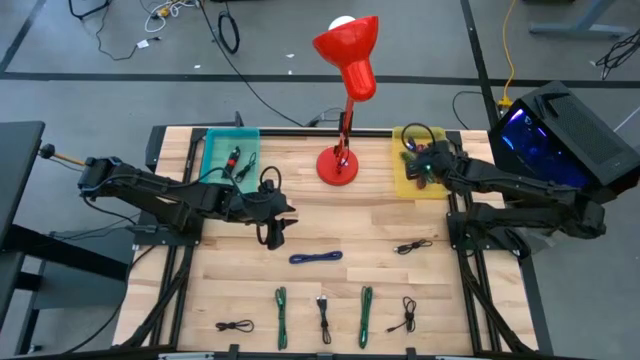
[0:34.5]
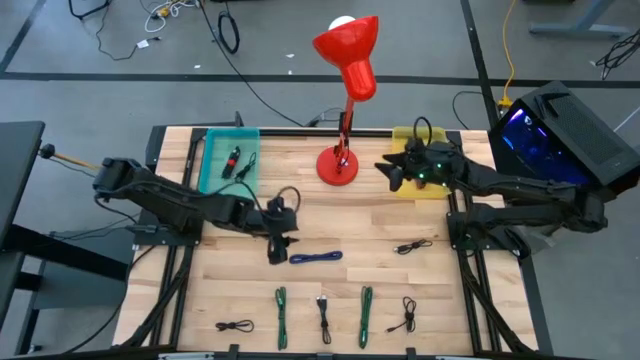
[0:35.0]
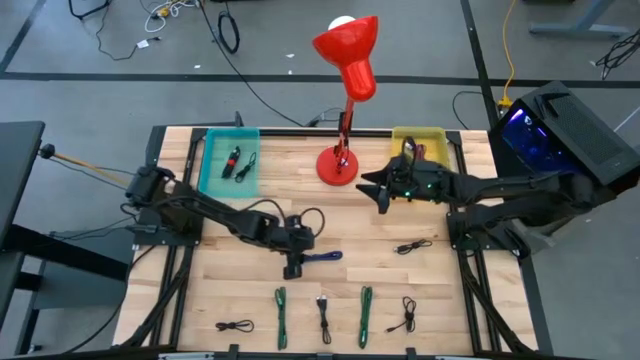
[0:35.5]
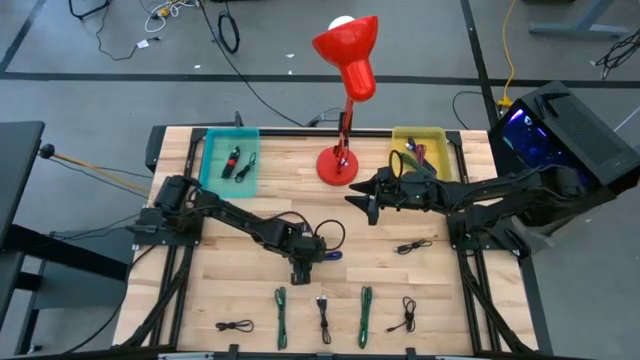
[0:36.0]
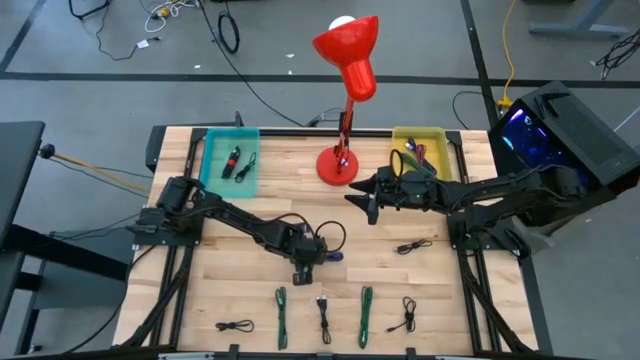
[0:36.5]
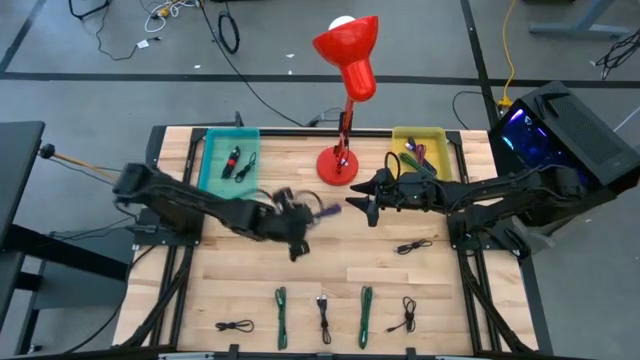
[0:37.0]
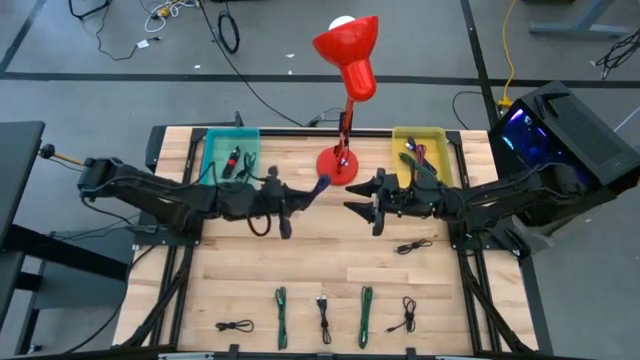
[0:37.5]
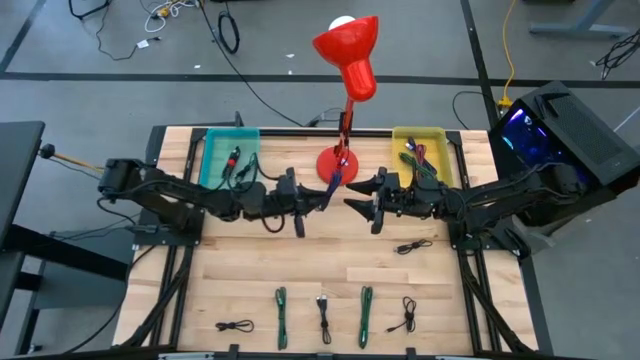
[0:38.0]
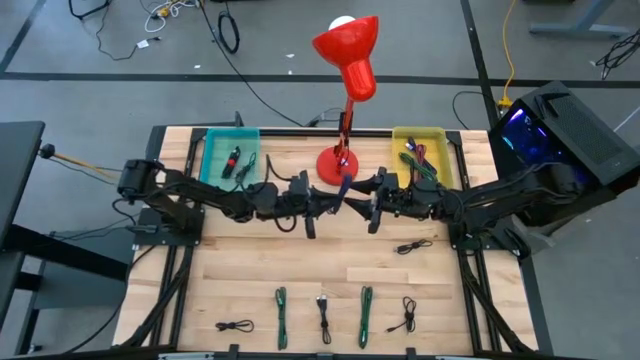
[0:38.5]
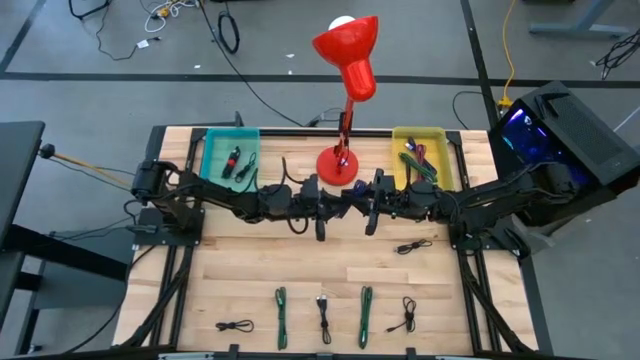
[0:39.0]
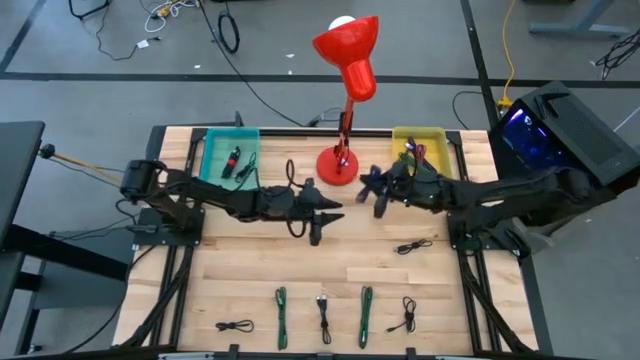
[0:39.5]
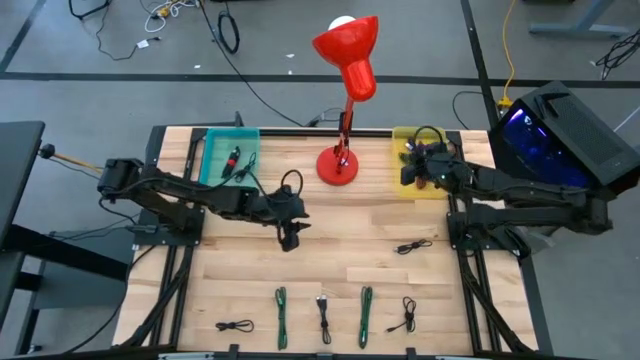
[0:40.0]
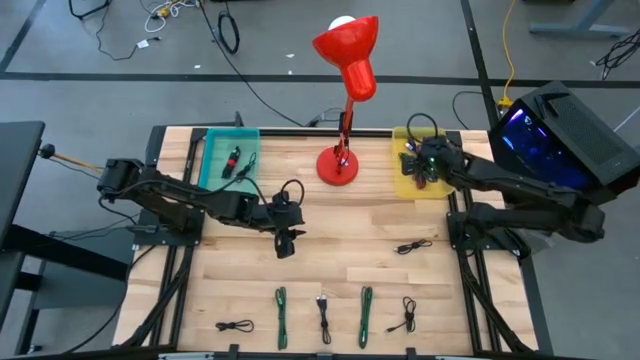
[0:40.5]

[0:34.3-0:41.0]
Task: Pick & Place USB Port
Put the violet black USB cable into the yellow bin

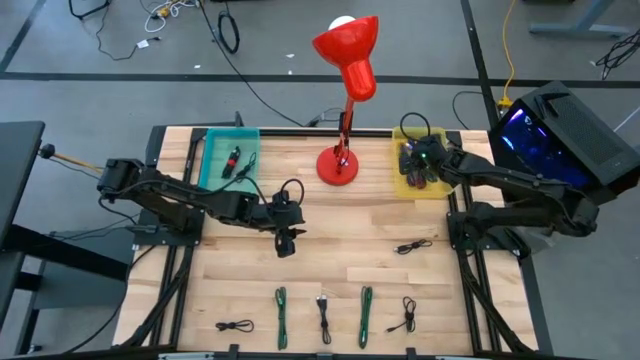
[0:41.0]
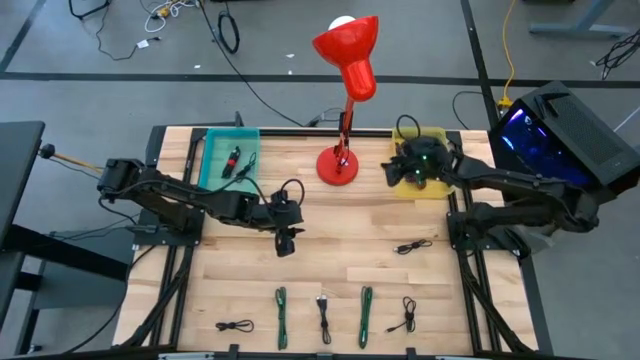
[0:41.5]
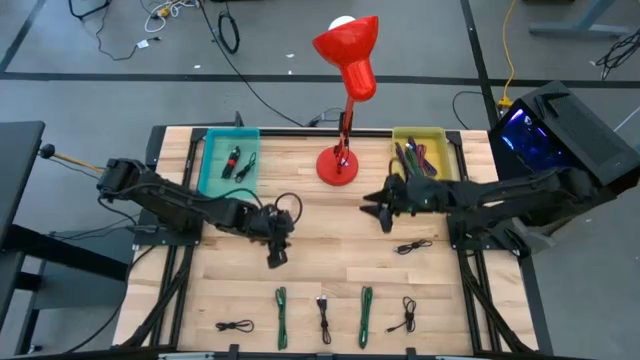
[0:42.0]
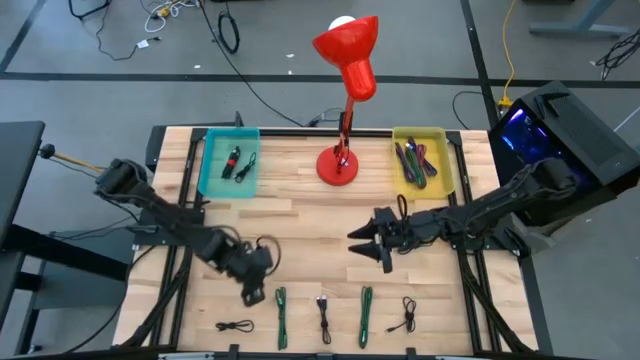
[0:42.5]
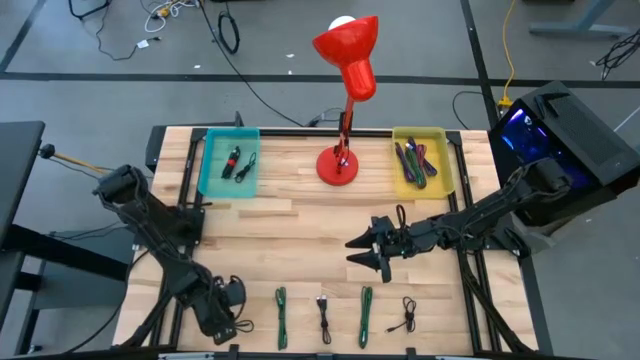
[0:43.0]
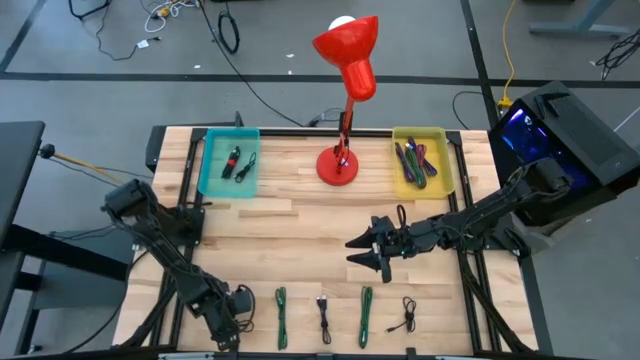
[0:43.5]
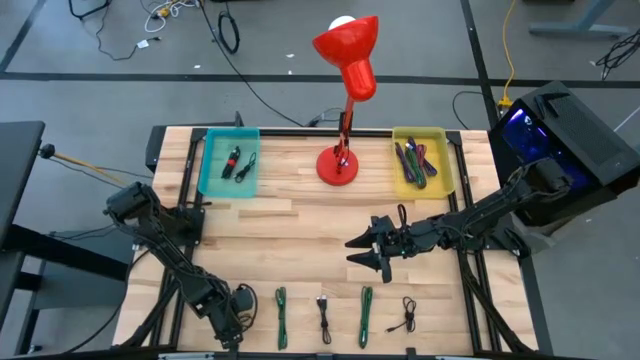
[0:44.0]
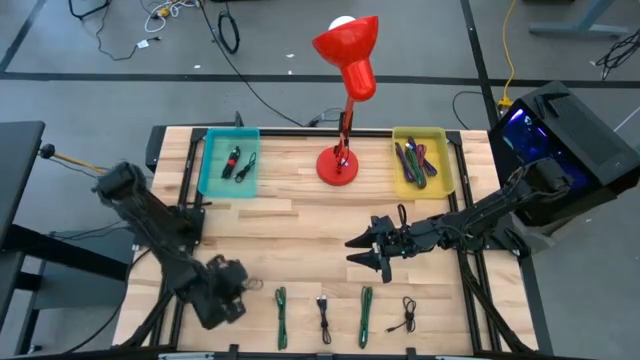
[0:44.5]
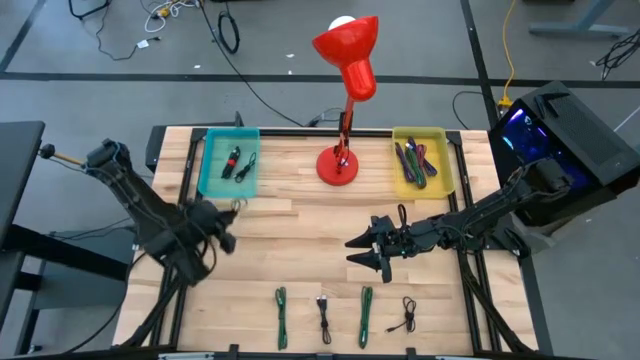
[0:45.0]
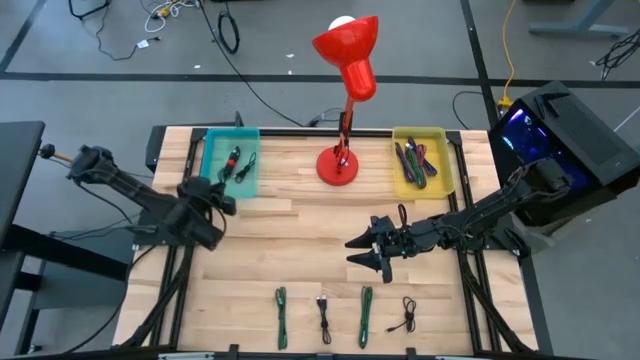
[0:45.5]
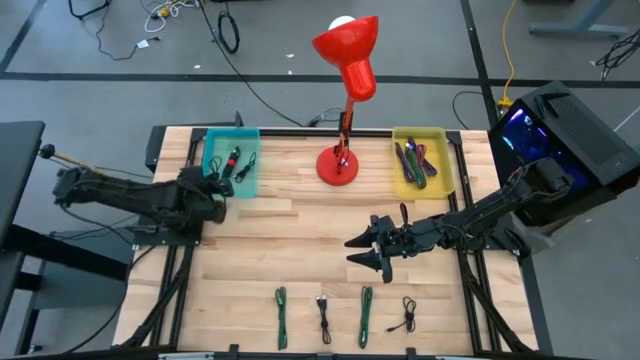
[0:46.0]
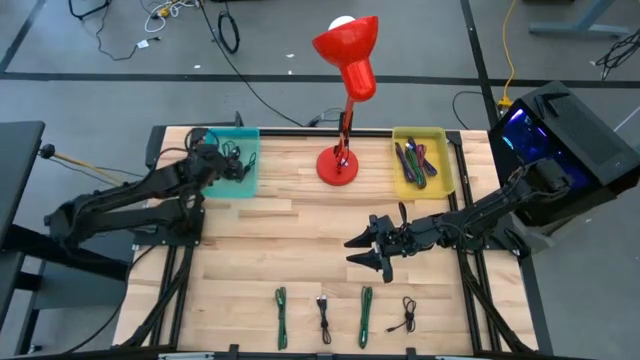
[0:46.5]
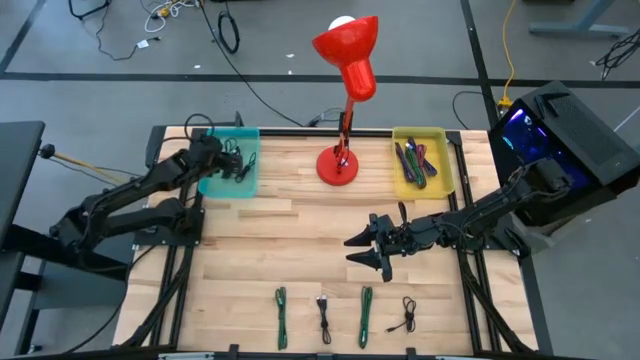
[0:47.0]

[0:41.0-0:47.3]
Put the black USB cable into the green bin

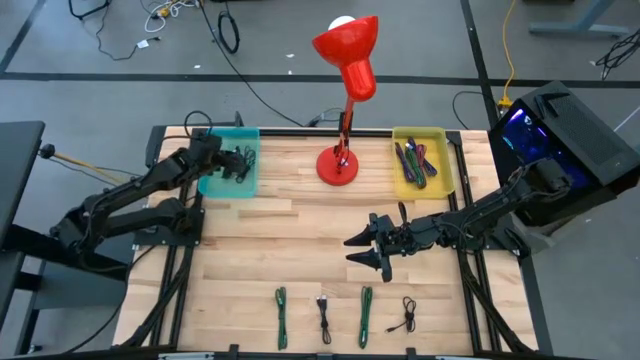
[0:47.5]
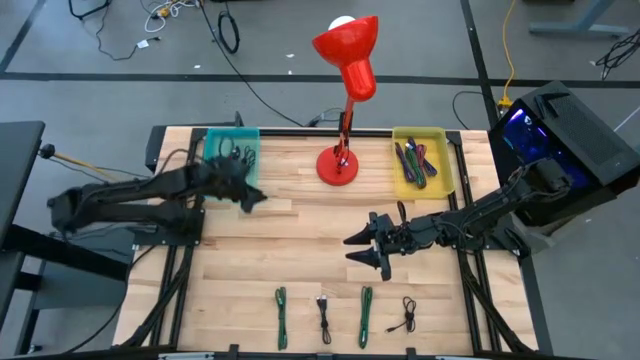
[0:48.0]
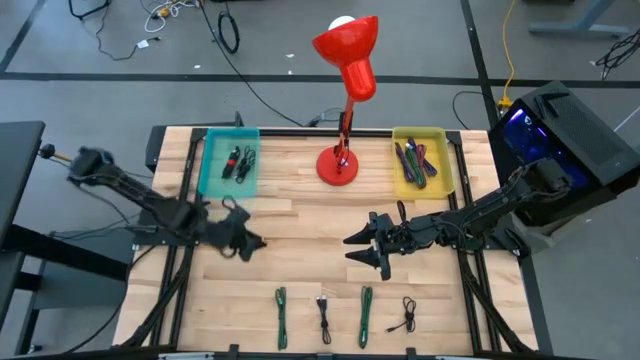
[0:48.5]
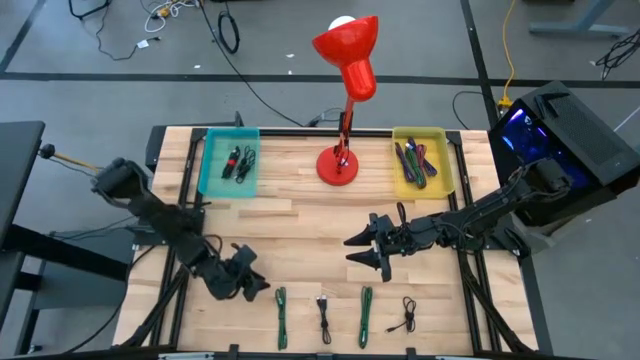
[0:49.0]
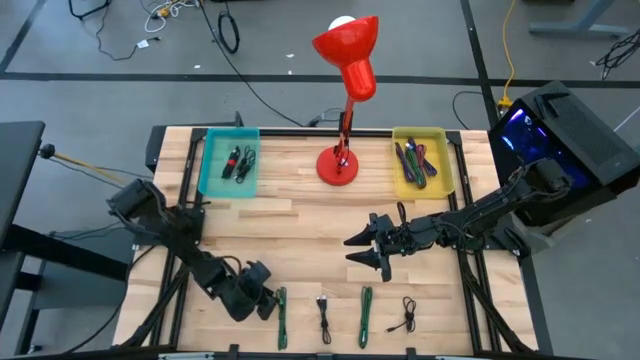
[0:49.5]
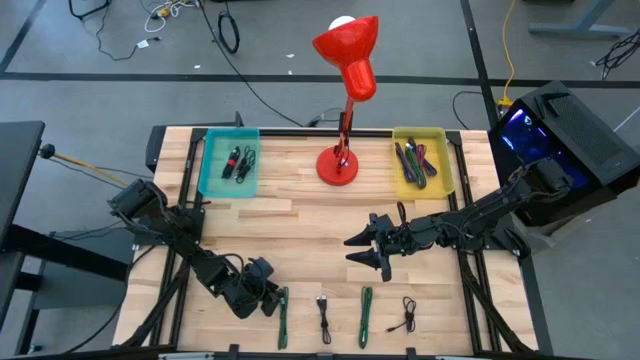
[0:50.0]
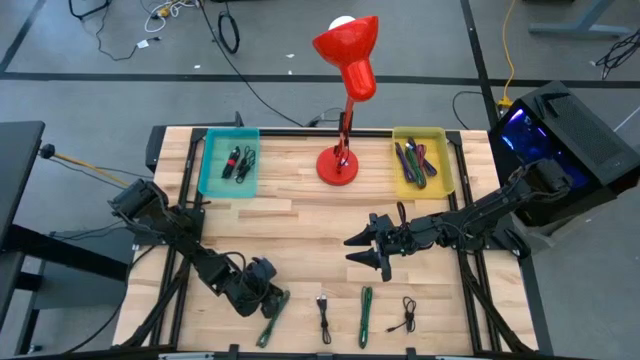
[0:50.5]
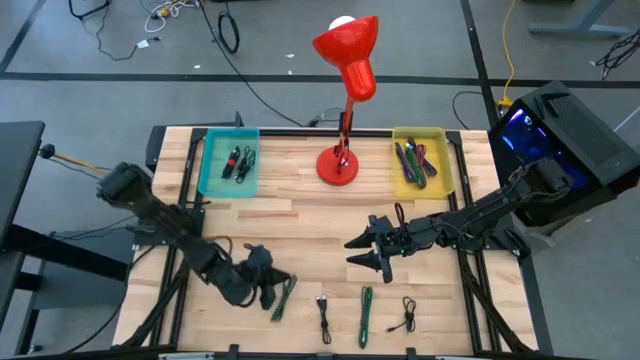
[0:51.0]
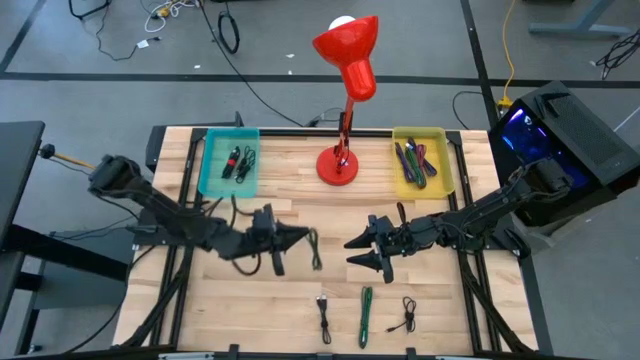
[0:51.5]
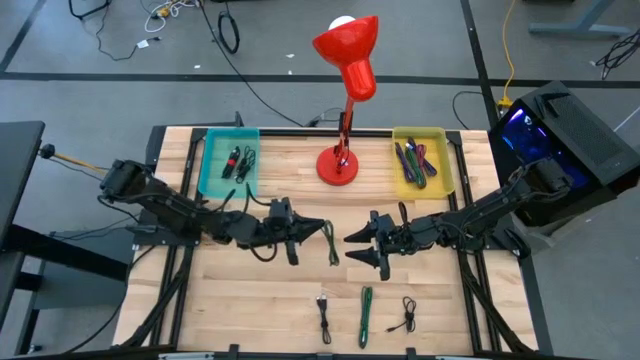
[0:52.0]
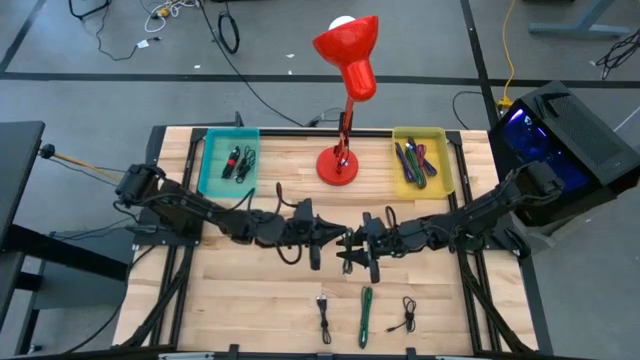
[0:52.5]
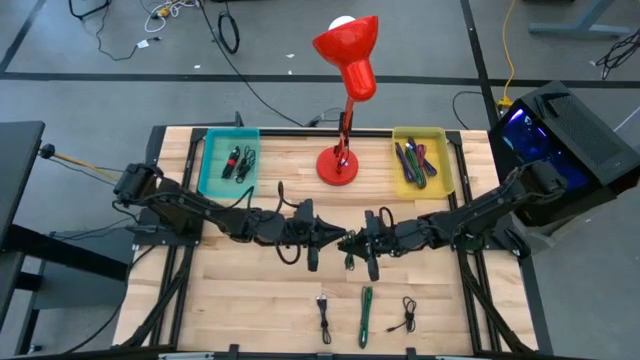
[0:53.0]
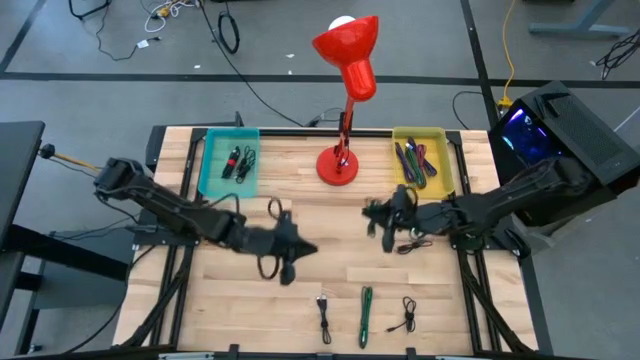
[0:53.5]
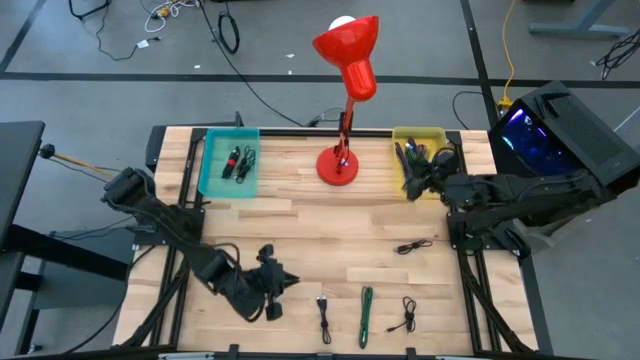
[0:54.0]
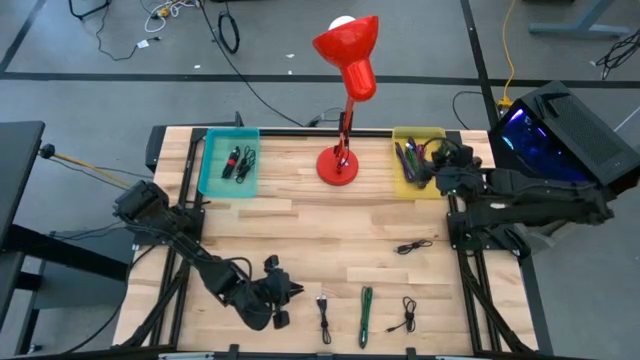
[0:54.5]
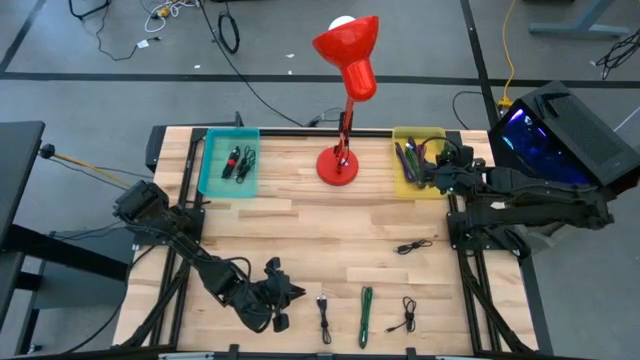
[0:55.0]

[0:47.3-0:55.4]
Put the green black USB cable into the yellow bin

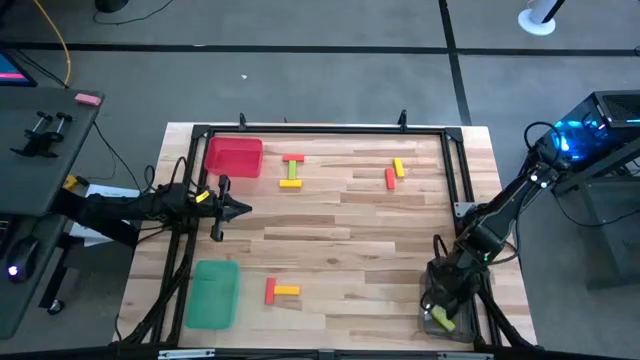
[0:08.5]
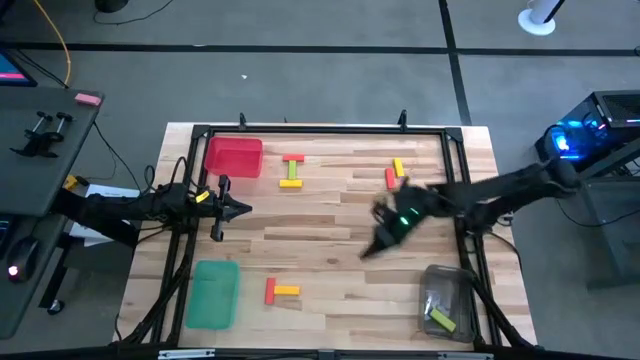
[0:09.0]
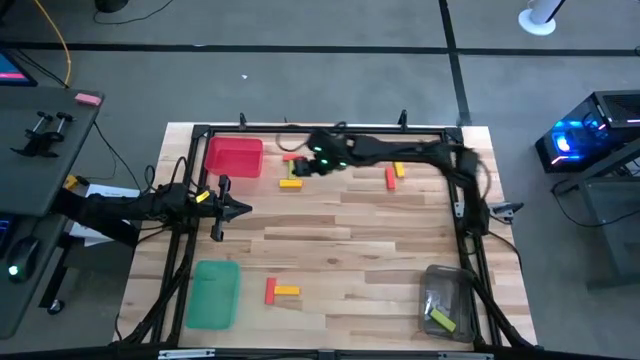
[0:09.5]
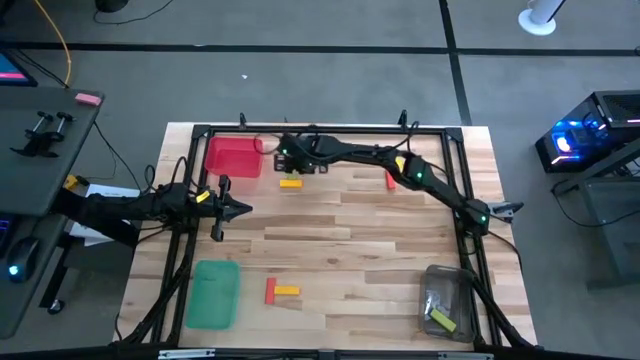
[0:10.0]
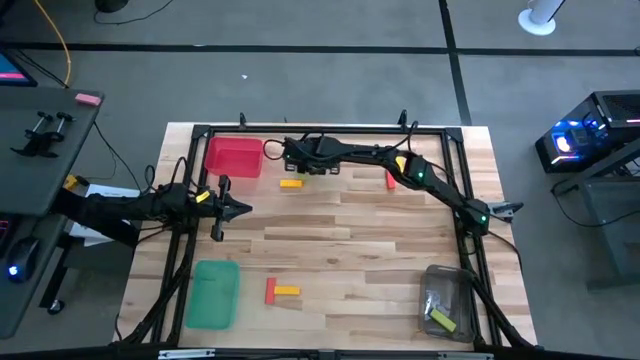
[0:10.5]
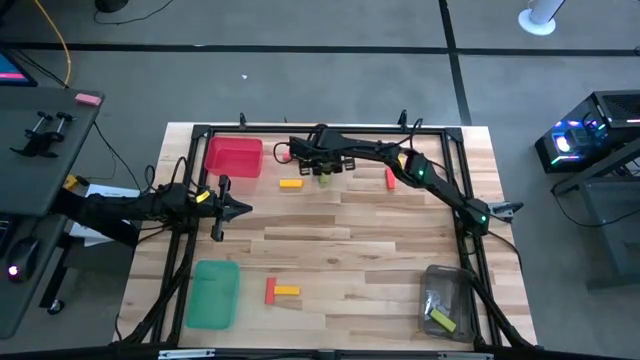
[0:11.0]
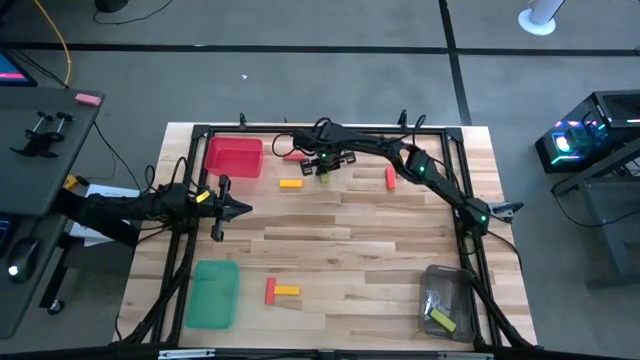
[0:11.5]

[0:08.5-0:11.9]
Task: Sort blocks
Put the green block into the black bin
